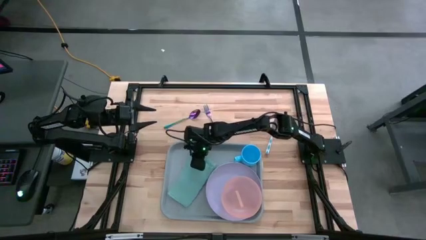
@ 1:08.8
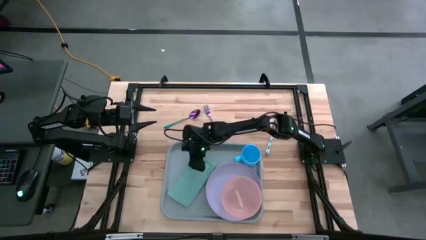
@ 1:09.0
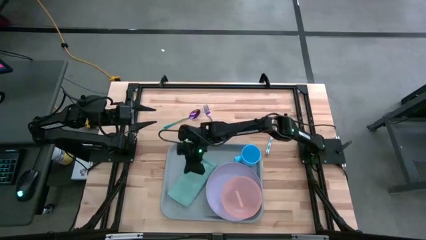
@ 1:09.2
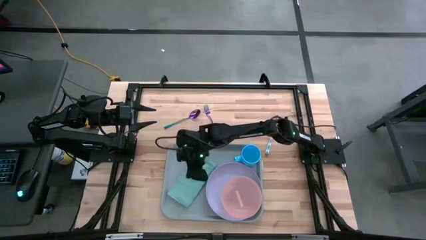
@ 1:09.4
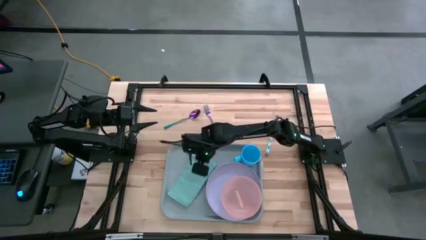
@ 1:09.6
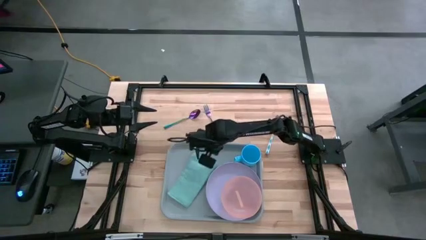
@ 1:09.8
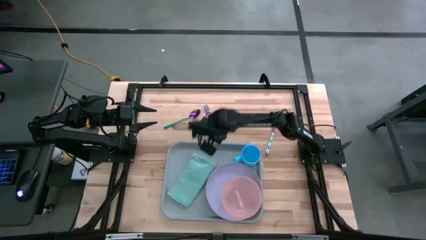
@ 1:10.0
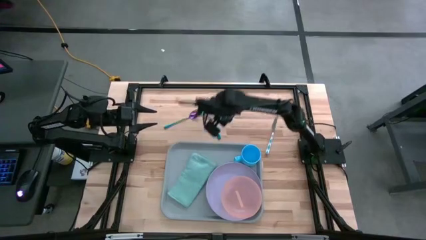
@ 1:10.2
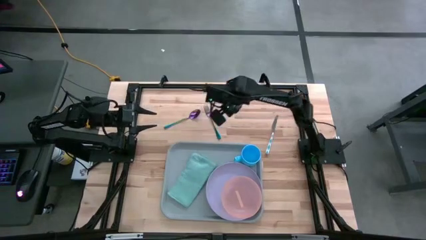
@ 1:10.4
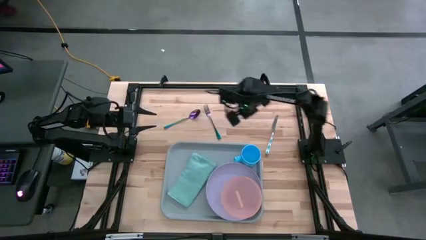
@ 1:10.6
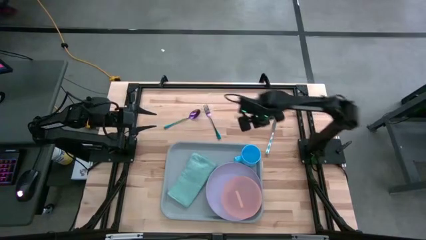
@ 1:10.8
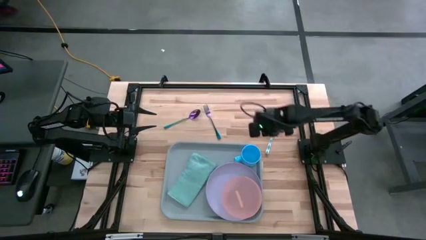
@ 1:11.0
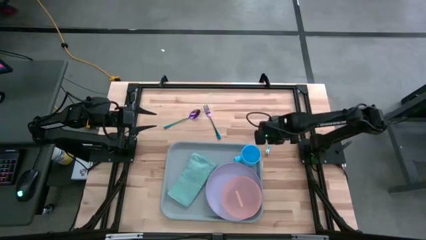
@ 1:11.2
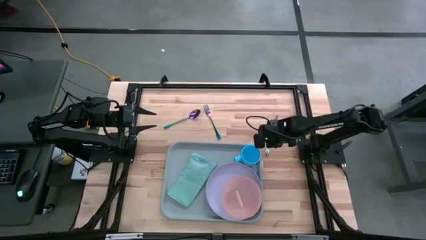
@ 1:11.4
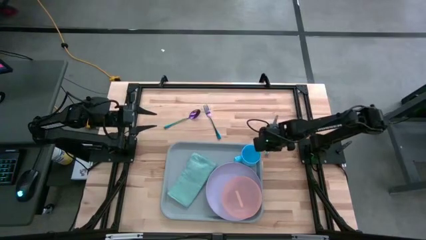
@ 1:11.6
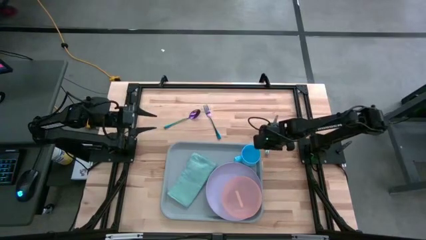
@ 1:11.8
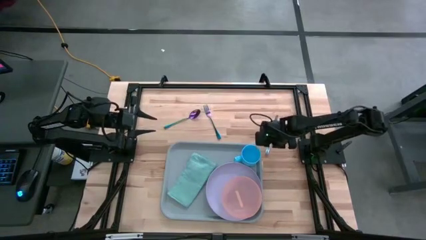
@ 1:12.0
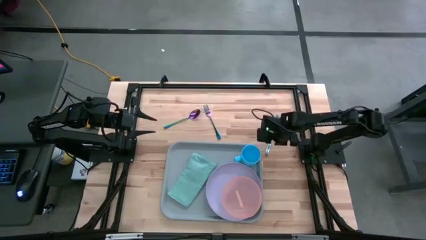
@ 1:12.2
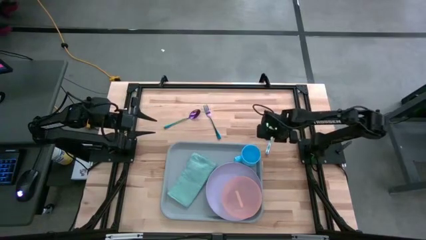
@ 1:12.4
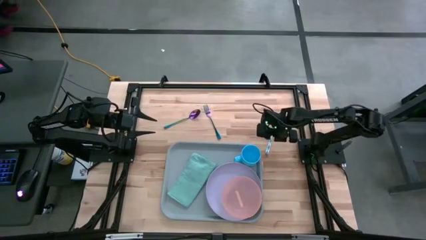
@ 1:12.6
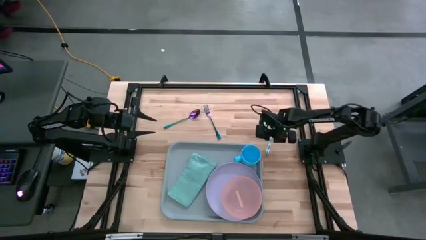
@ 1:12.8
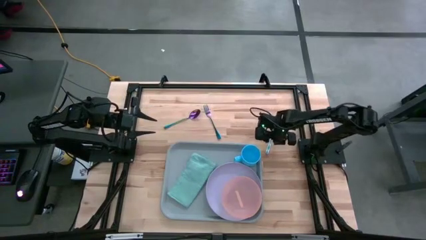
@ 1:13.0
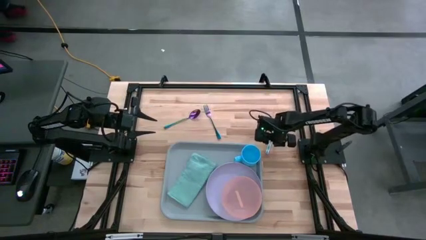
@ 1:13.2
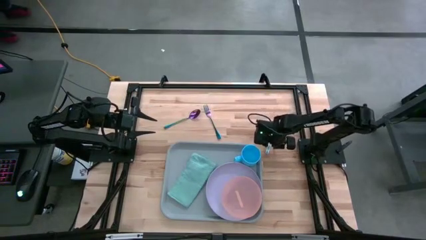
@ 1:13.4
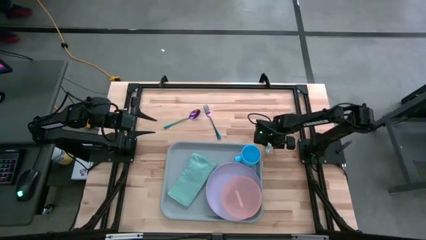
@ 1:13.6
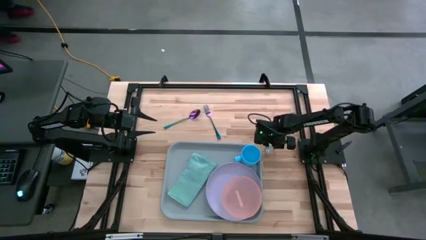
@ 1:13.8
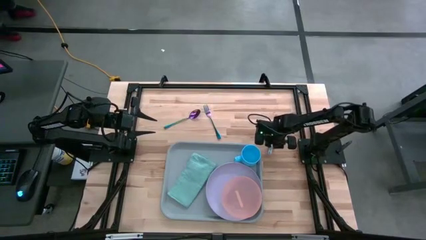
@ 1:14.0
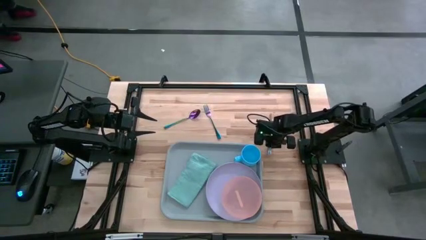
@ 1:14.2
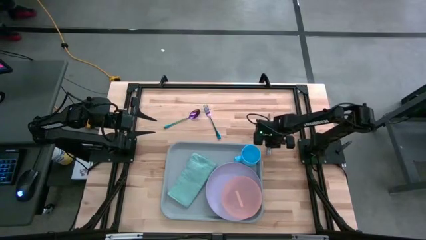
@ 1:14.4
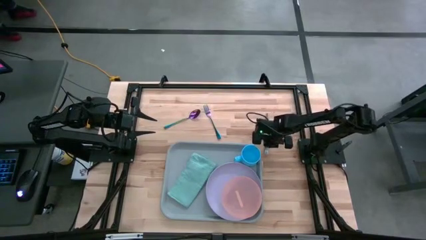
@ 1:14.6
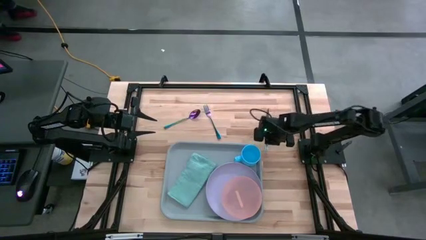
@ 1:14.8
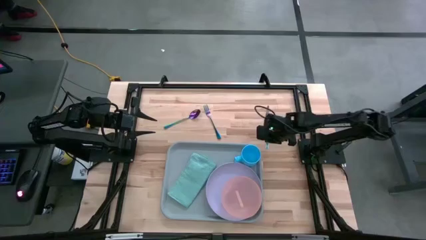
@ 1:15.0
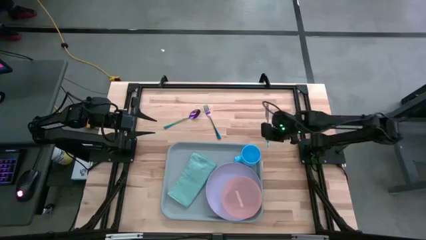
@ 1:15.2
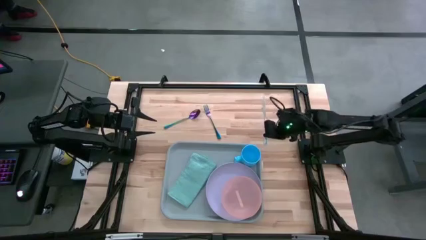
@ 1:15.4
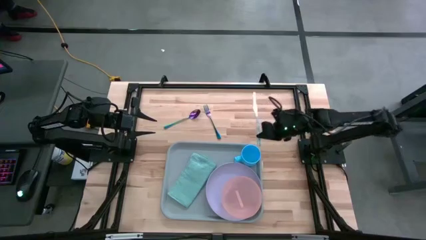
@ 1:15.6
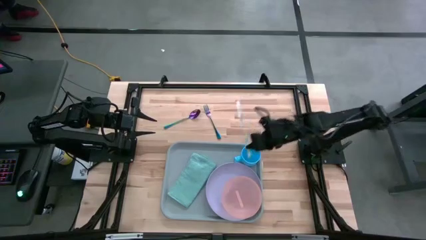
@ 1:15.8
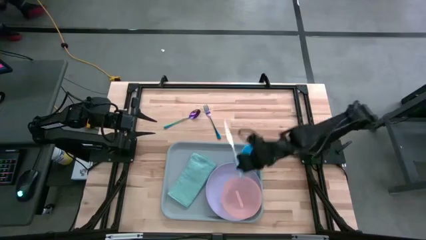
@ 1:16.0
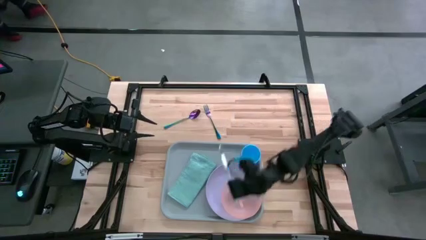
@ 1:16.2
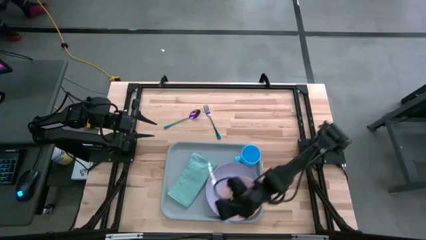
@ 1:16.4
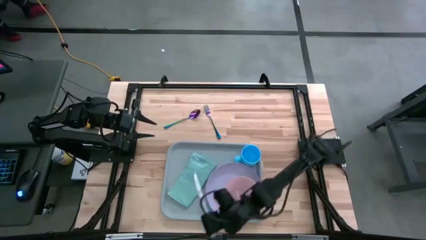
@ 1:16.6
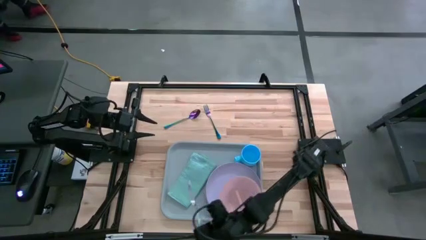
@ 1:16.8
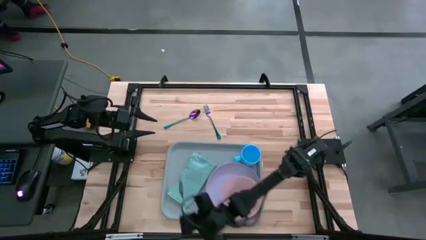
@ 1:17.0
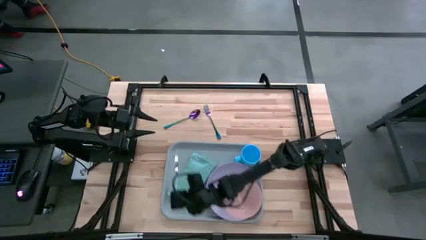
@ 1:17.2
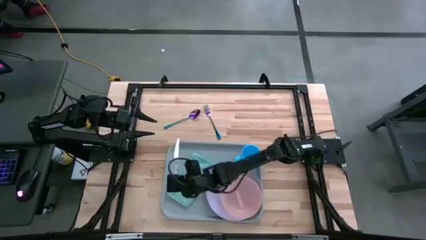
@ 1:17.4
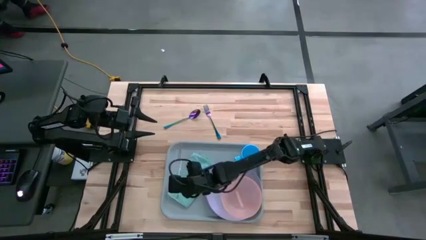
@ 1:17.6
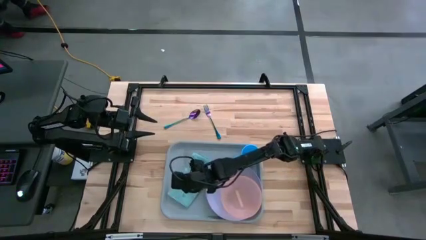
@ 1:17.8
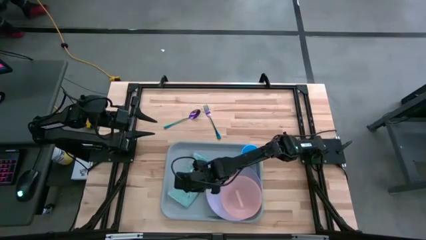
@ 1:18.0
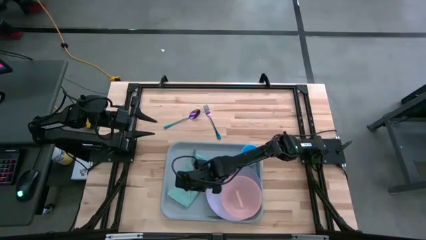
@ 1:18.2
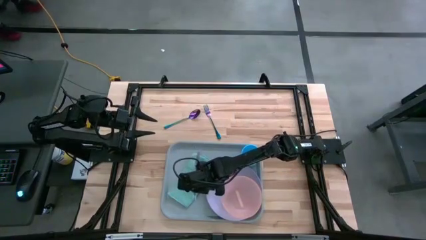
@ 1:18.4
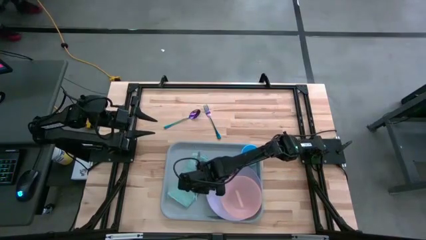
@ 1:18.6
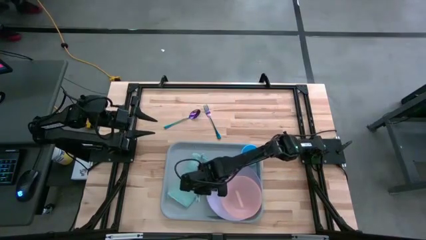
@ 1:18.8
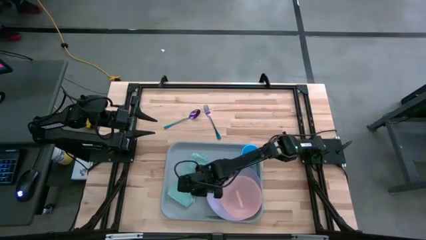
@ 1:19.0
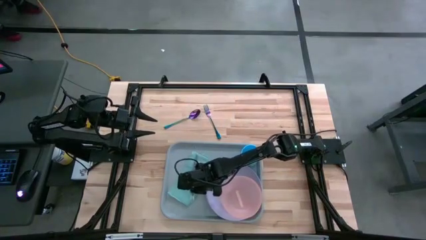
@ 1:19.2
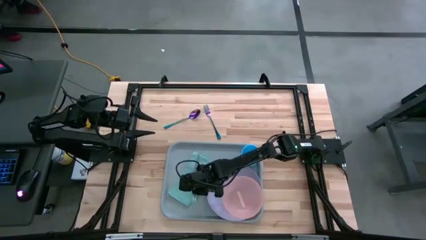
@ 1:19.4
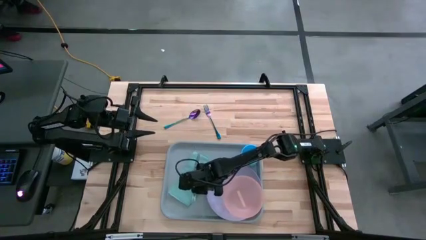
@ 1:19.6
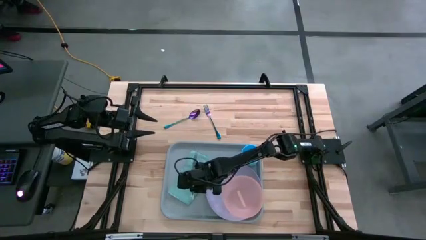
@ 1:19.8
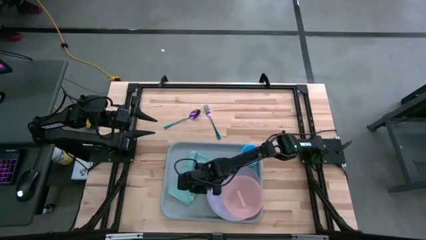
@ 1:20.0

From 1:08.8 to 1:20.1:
Task: Set up tray
Put the green knife on top of the blue napkin

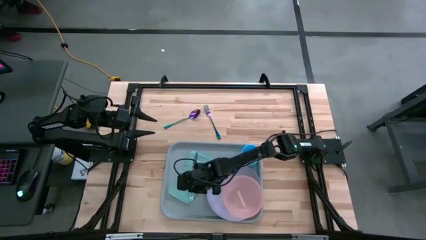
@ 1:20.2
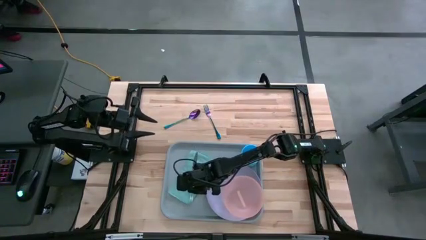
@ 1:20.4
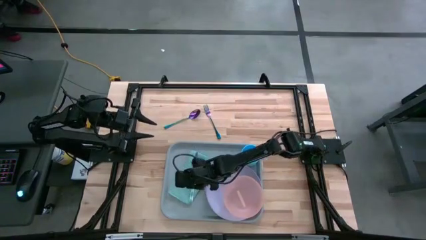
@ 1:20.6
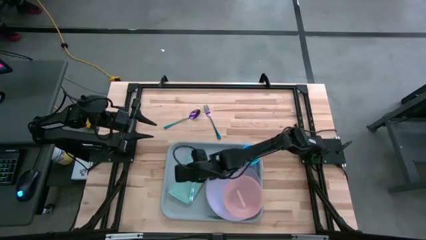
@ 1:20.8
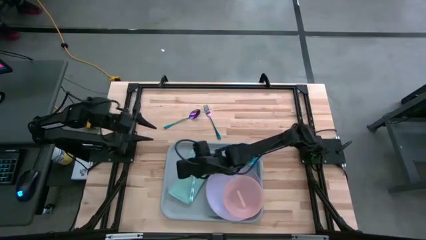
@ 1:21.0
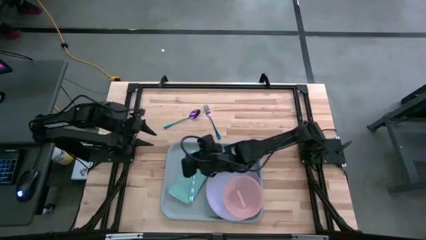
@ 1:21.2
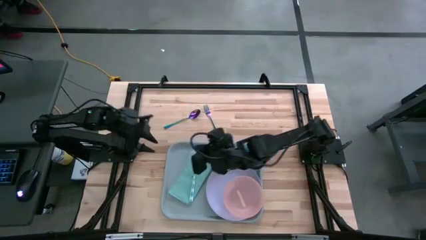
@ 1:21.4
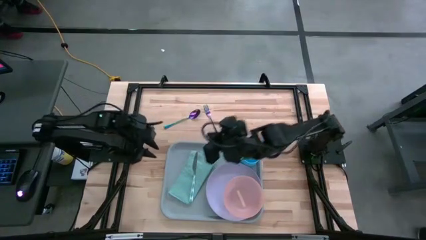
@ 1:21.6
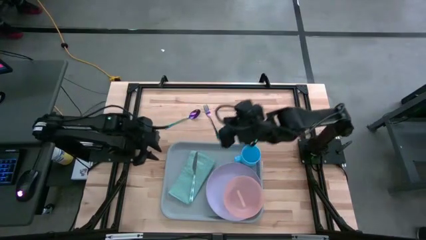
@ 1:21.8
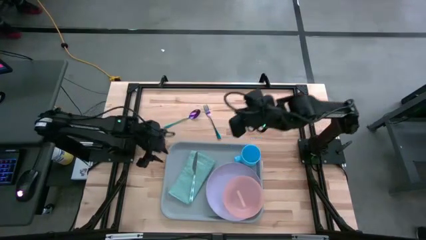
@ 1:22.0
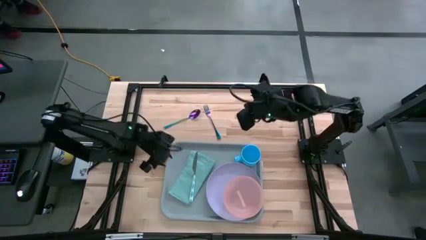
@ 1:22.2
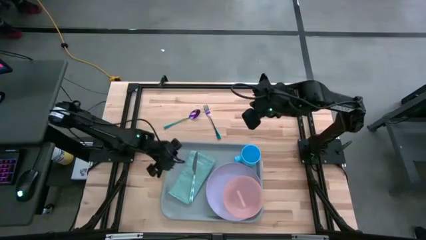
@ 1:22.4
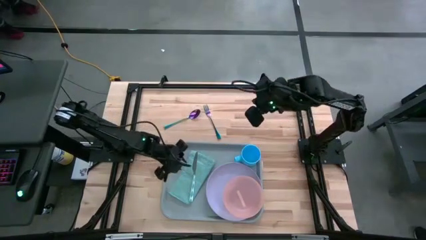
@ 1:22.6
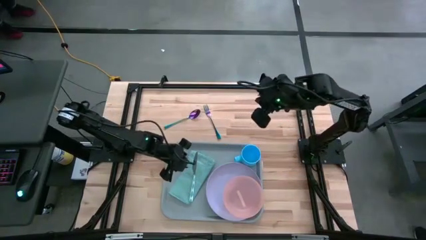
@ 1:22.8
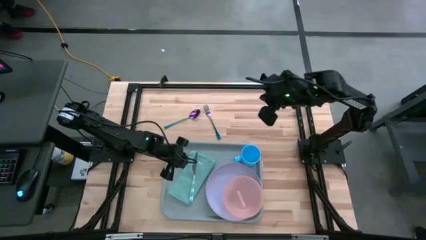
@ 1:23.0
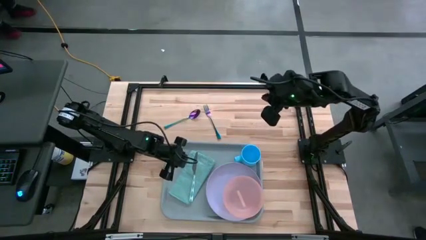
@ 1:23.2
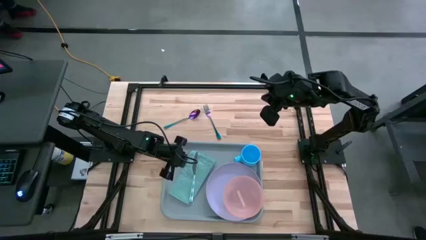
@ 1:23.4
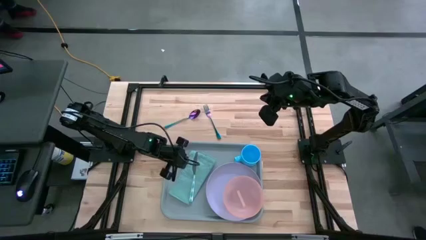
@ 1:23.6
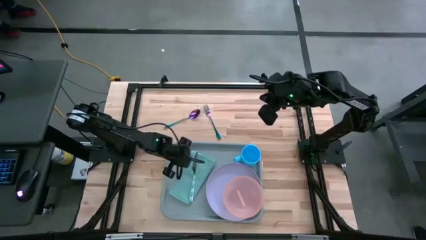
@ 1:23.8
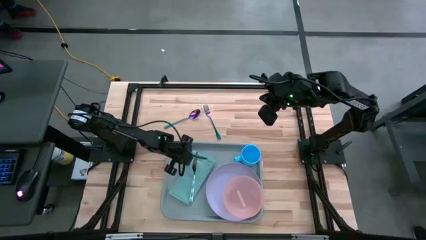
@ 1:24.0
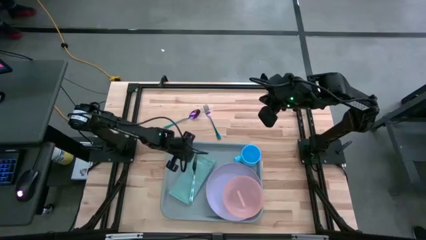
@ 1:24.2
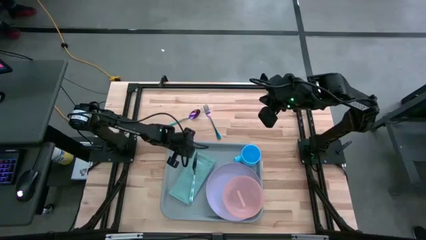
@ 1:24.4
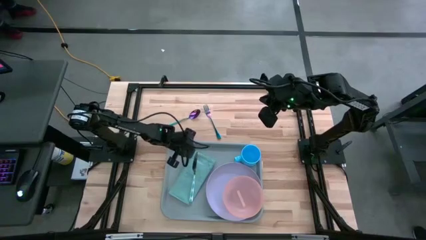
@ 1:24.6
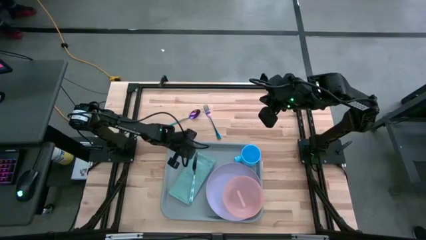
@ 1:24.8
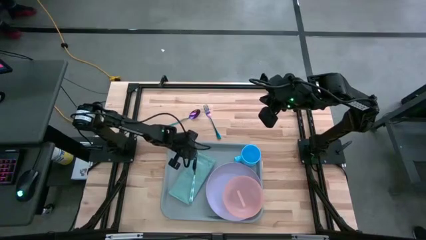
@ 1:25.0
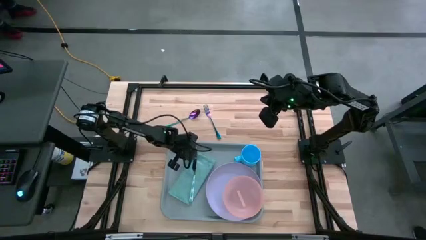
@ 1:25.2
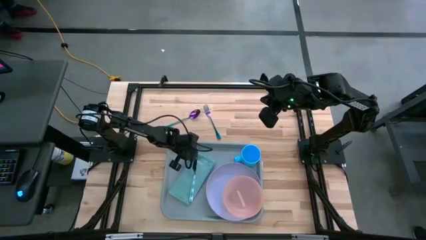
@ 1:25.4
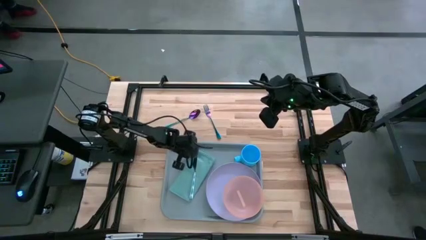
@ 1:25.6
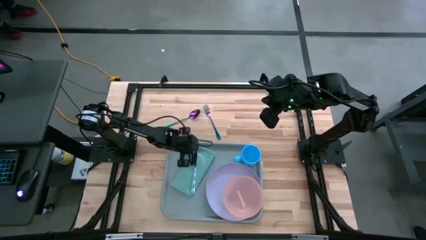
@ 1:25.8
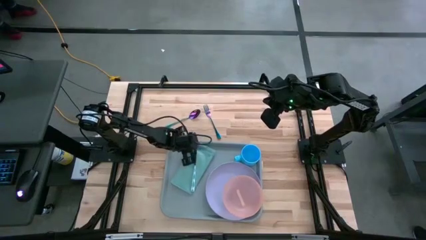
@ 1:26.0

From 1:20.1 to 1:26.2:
Adjust the blue napkin
